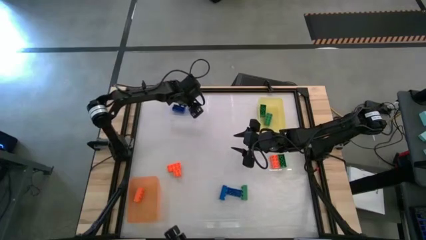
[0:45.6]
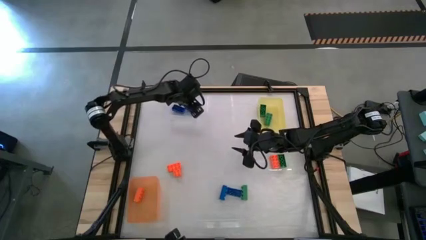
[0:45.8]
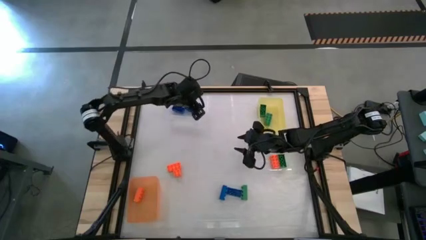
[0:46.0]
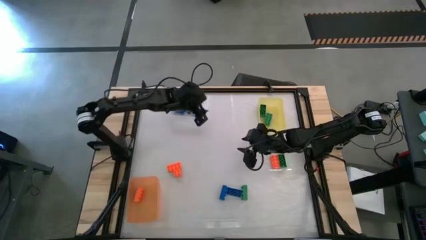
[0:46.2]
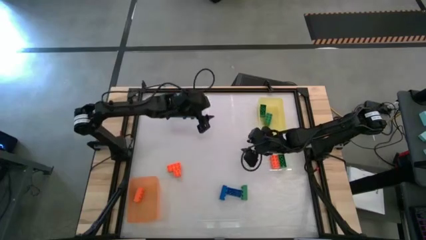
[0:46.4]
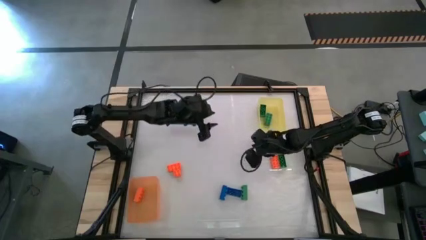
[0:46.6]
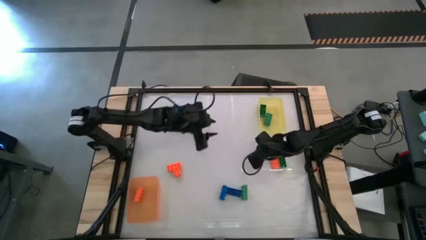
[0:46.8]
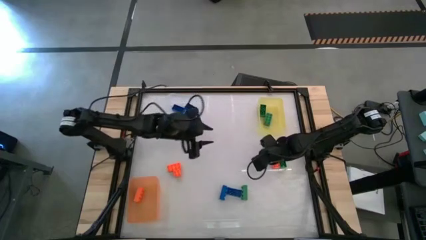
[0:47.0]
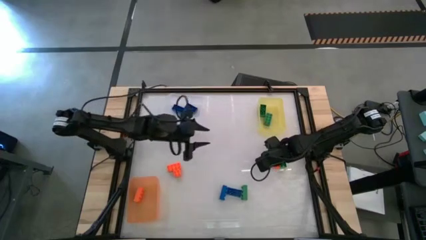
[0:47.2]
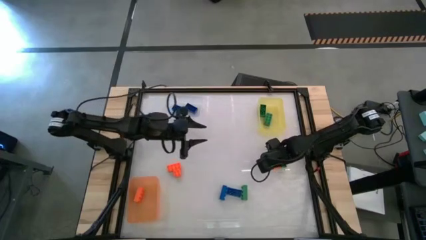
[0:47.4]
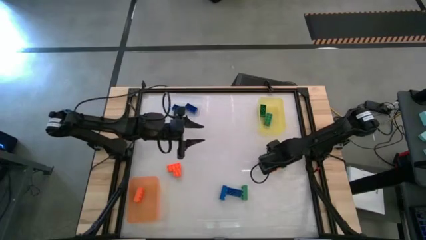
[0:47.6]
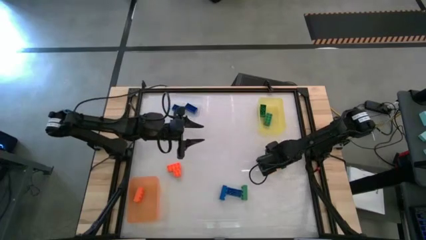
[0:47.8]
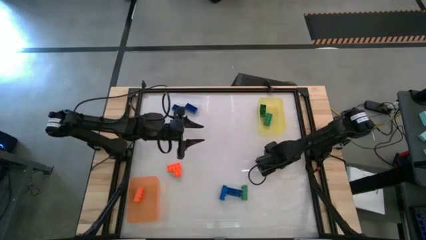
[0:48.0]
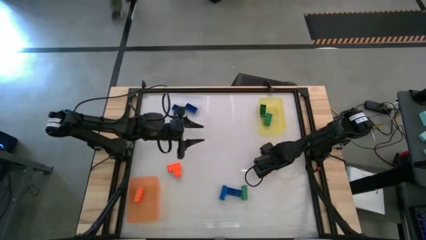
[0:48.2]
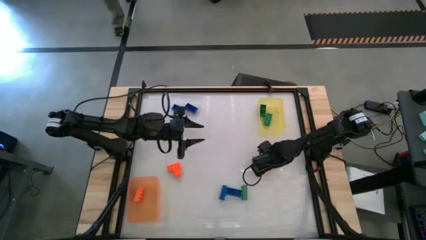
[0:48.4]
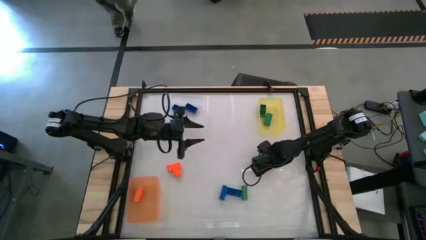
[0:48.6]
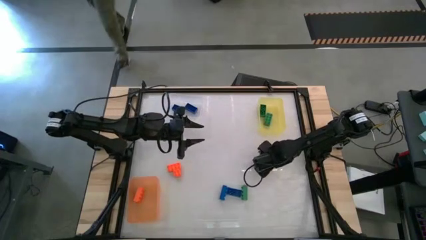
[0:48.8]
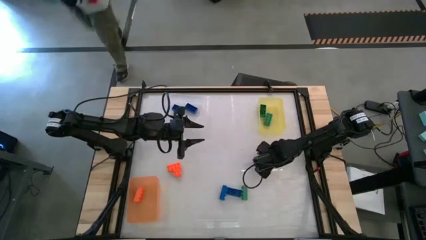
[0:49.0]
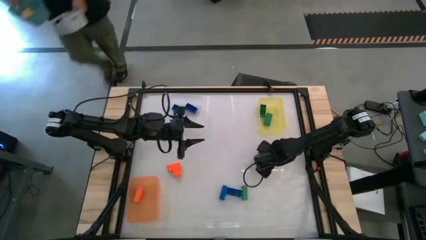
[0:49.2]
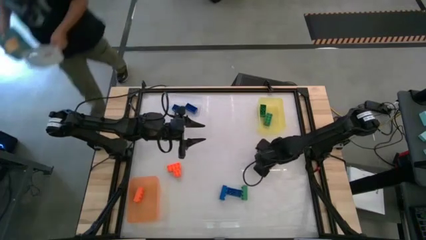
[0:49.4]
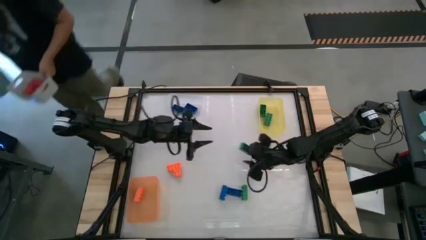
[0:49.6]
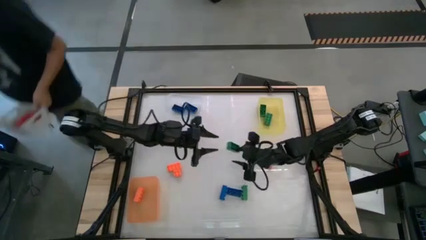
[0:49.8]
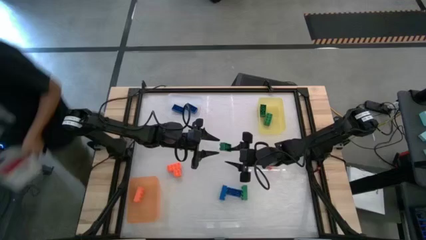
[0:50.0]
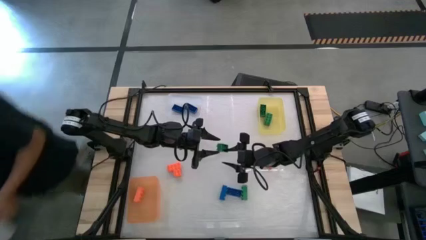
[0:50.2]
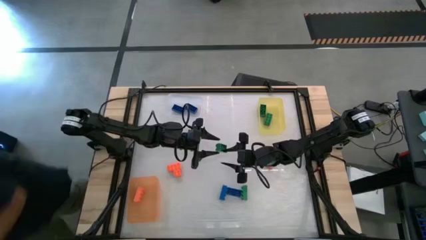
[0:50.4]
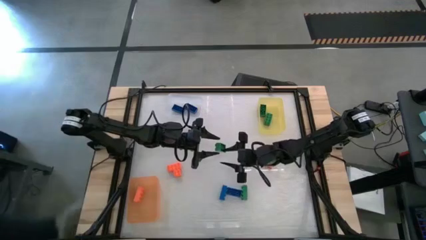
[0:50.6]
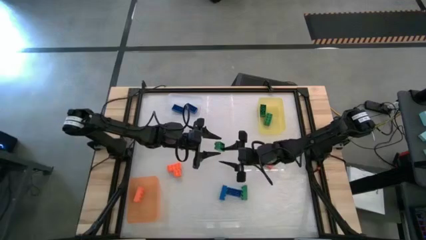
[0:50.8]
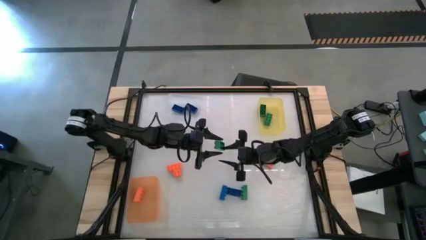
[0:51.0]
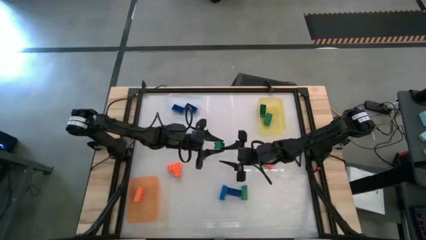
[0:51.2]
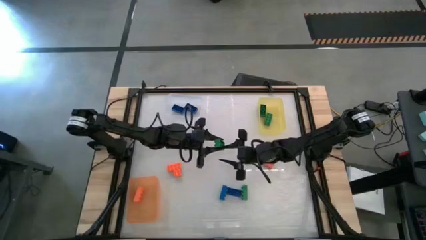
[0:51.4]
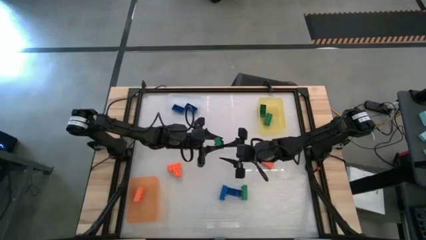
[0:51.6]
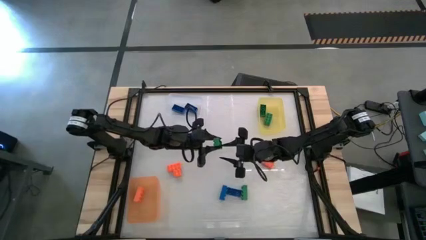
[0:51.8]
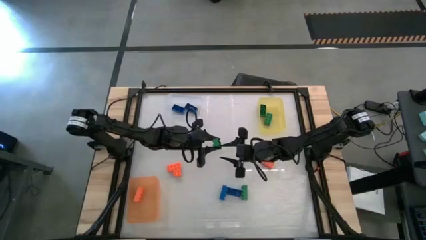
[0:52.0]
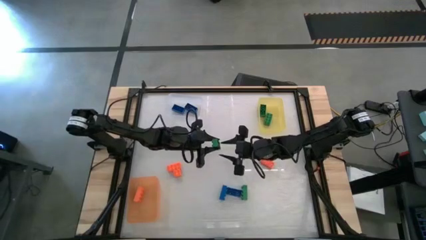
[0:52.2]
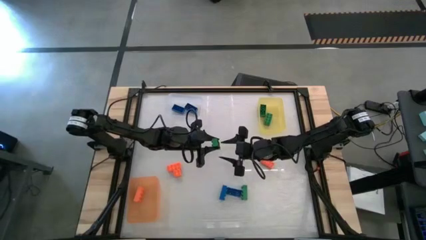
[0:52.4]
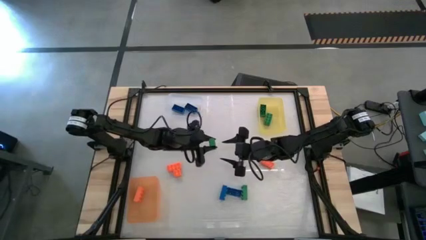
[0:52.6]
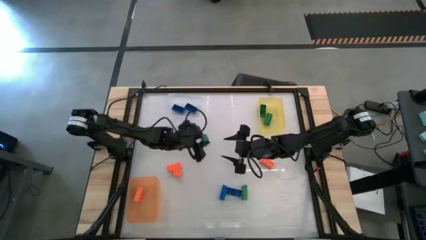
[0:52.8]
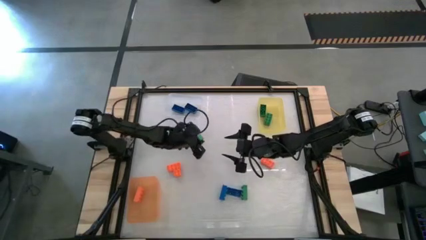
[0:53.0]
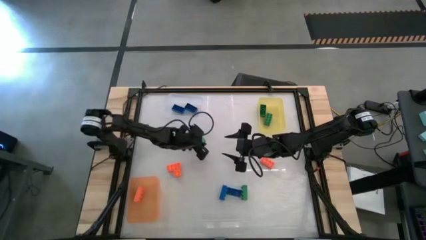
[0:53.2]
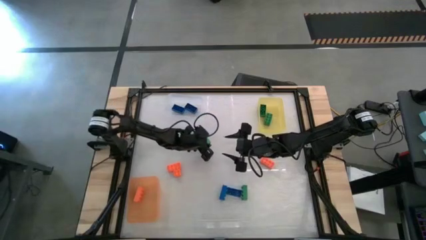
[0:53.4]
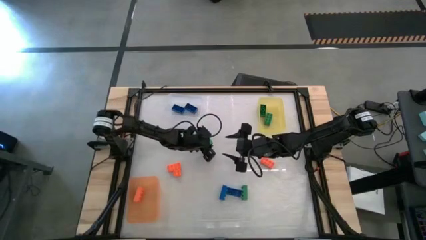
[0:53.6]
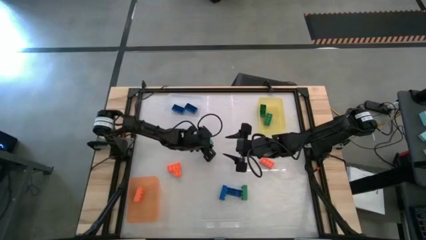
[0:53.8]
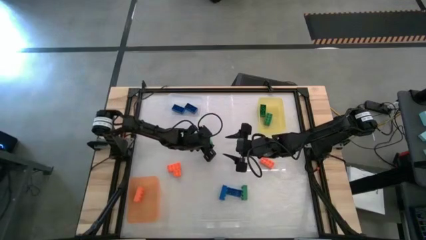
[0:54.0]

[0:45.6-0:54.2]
Task: Sort & place blocks by color
Move the green game piece from the middle right to the center

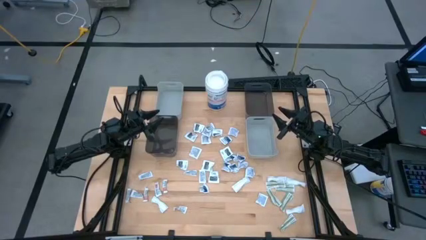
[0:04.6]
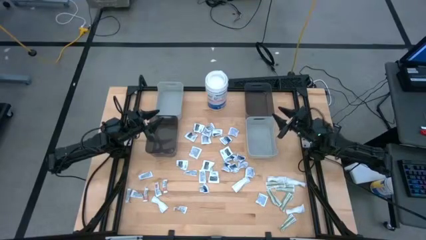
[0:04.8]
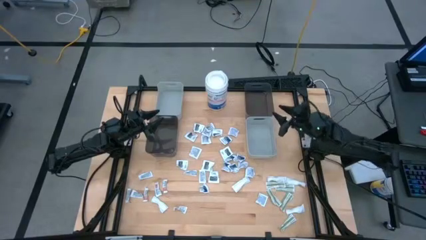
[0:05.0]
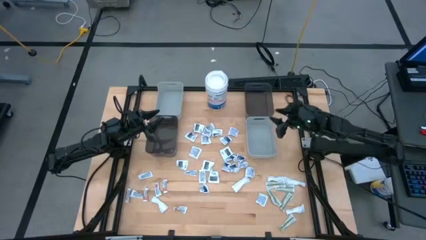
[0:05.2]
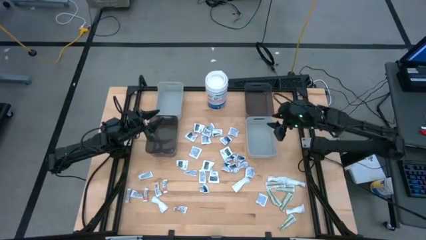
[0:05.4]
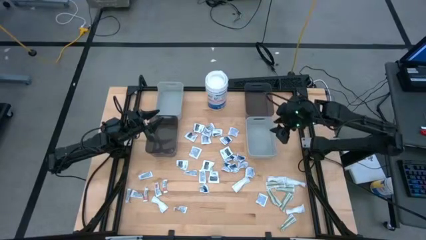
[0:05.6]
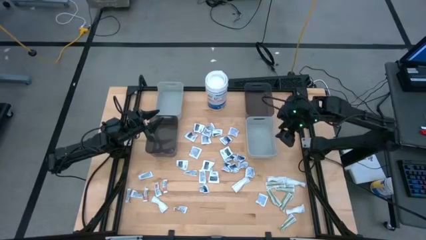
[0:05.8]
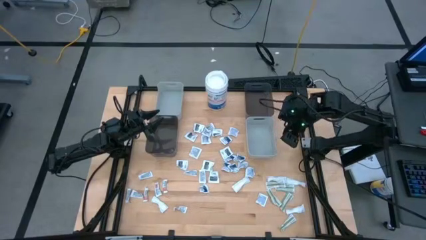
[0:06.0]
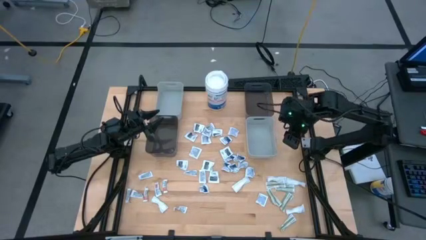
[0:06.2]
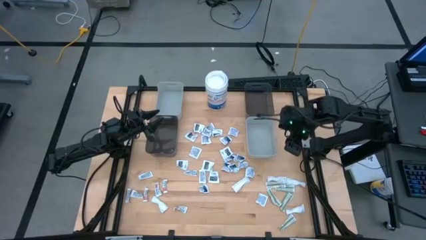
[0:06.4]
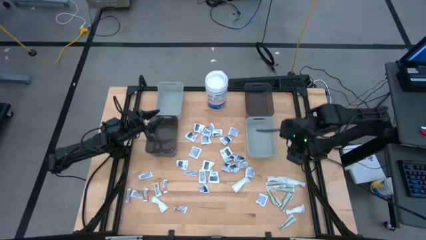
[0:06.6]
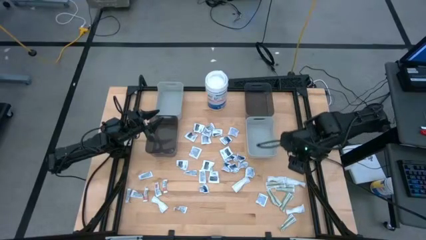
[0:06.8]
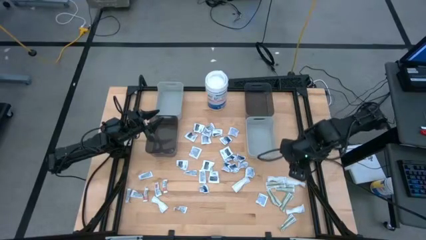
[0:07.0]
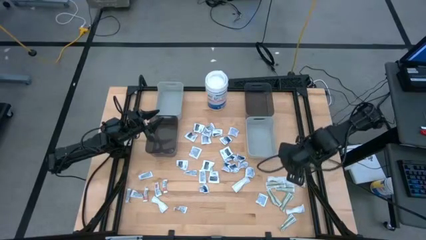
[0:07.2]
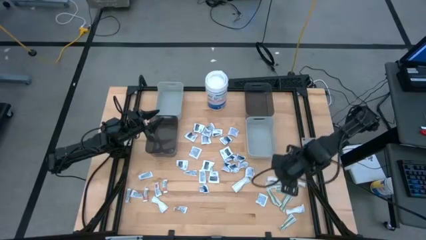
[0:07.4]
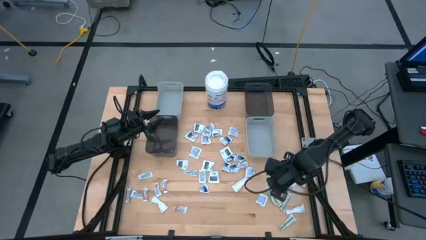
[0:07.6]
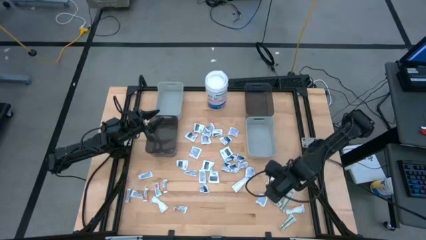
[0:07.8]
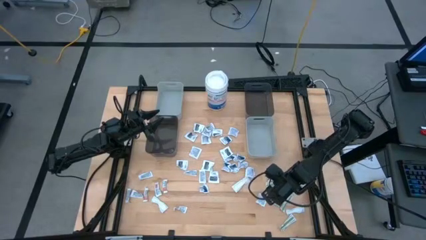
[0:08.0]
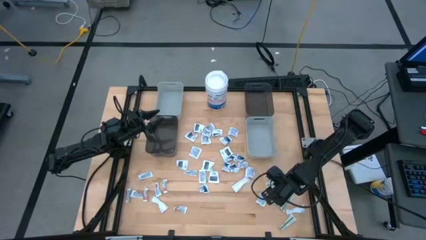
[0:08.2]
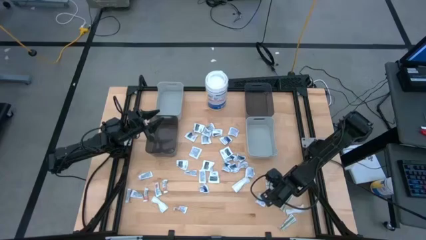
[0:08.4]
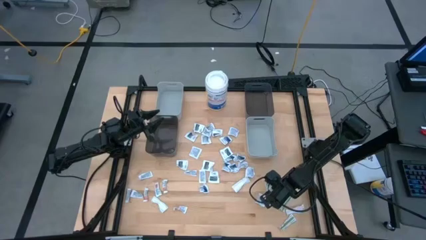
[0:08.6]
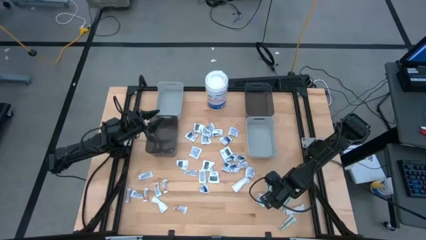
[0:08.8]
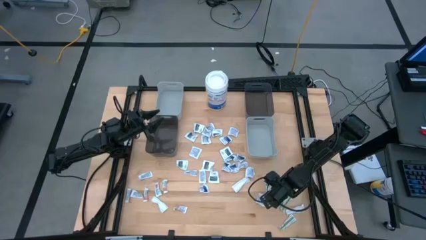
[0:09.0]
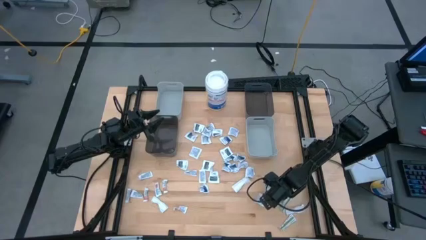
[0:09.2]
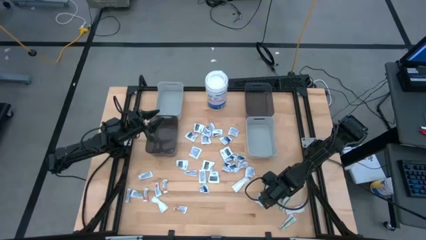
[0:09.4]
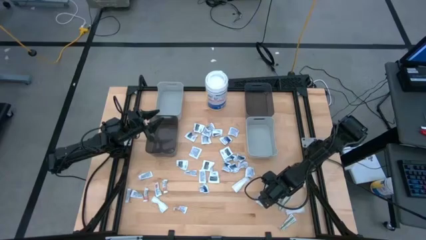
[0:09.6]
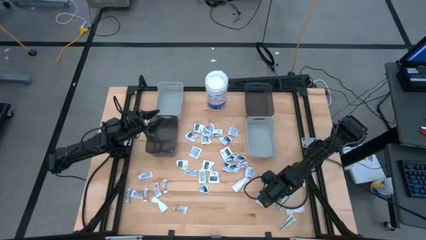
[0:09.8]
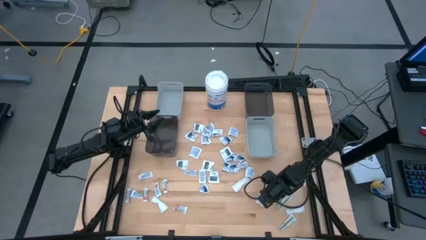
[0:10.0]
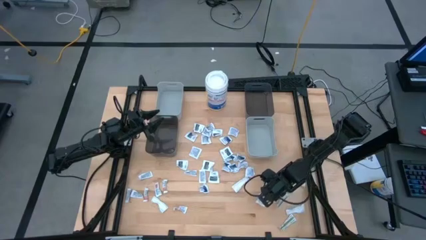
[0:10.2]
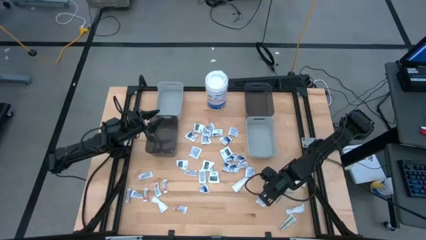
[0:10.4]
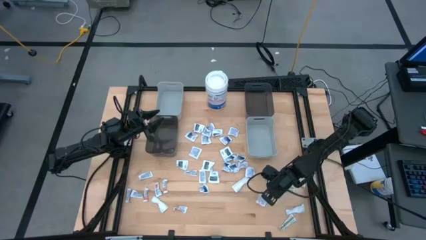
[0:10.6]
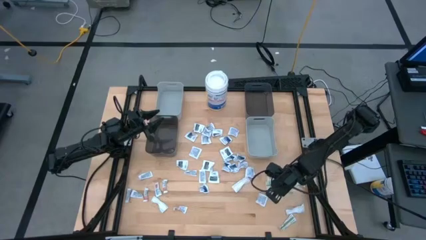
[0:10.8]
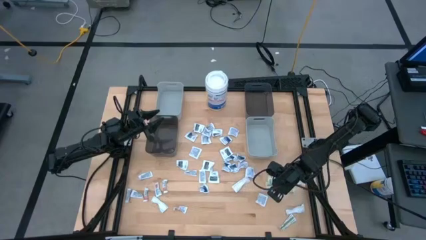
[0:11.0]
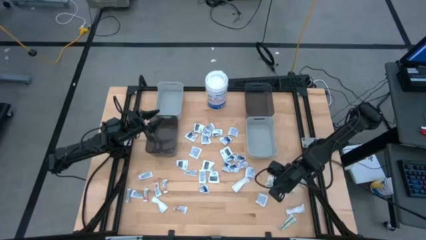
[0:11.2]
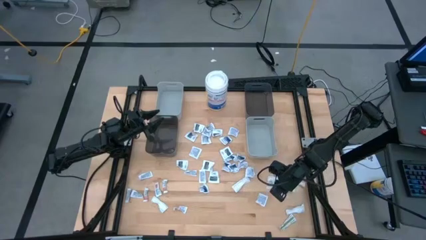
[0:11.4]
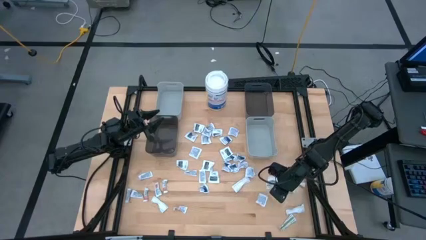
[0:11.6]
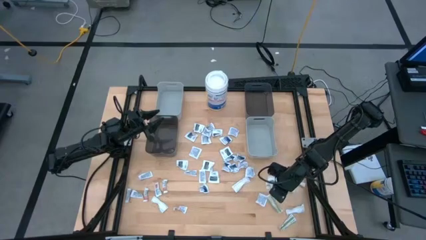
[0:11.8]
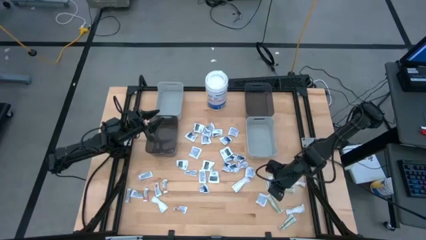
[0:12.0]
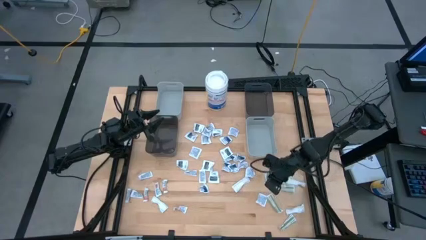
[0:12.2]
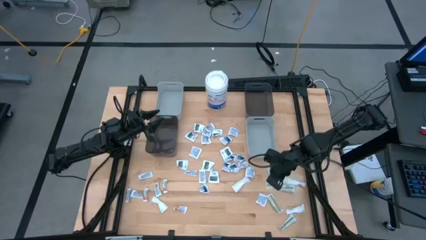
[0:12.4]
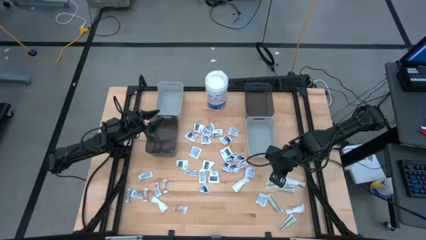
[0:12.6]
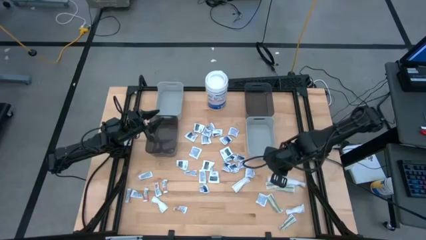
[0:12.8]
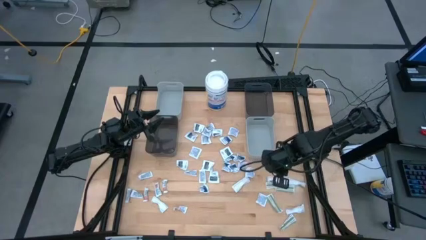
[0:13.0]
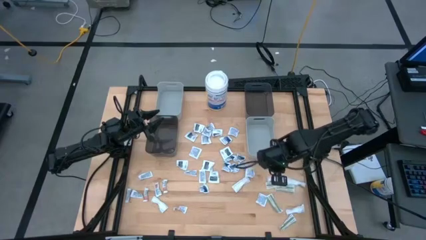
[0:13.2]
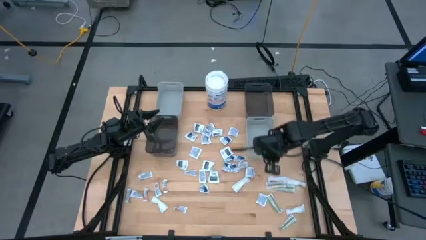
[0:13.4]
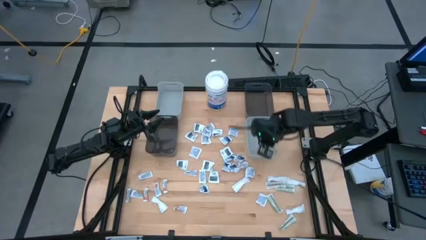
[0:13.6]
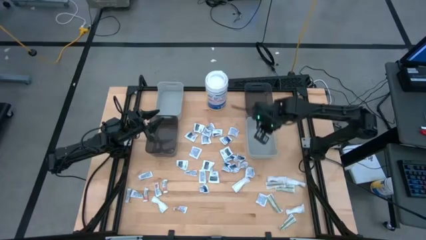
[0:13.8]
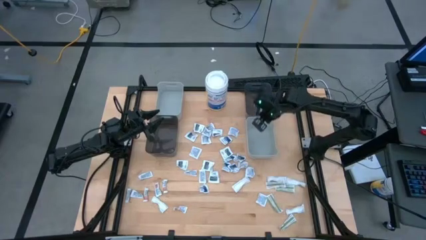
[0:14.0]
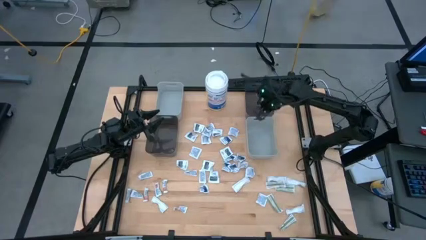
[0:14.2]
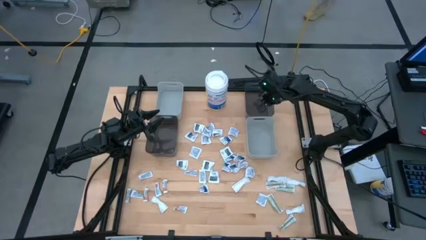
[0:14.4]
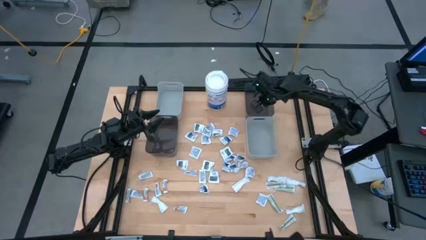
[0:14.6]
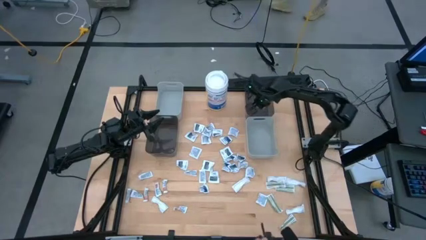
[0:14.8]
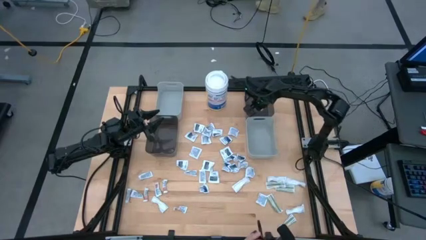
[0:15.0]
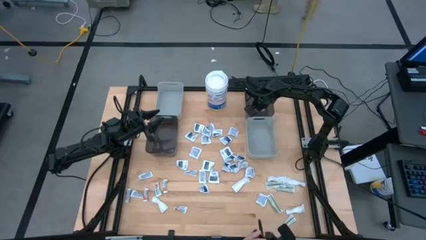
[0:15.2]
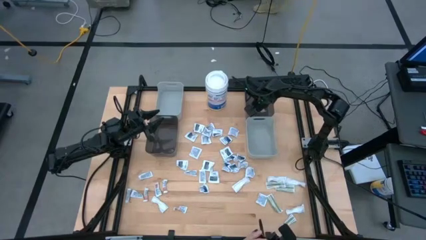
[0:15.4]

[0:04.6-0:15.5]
Task: Pick & Place First Aid Supplies
Put the green bandage into the right black bin
